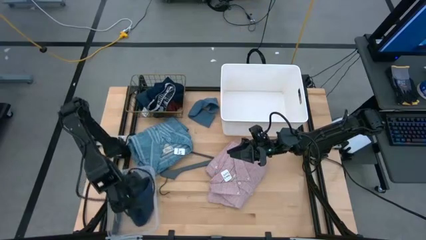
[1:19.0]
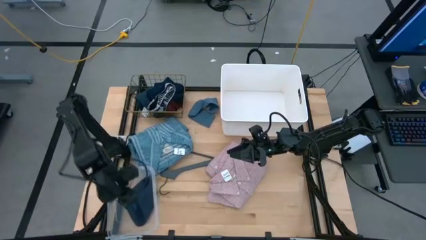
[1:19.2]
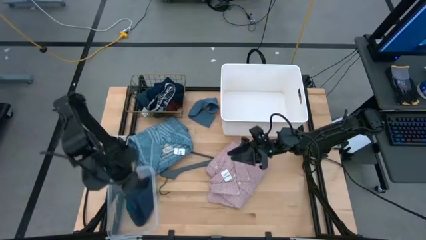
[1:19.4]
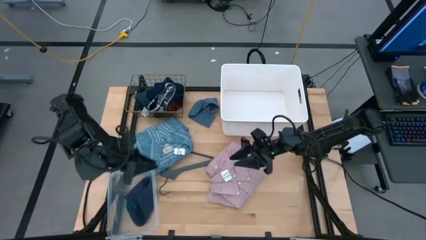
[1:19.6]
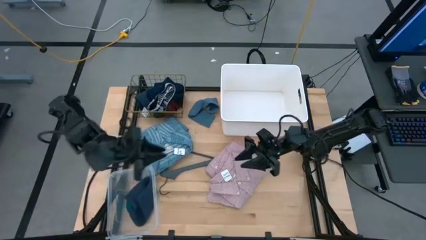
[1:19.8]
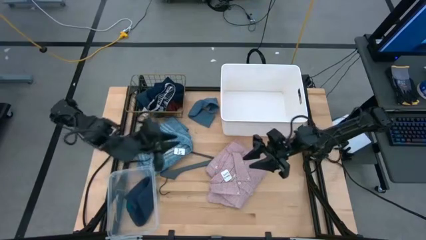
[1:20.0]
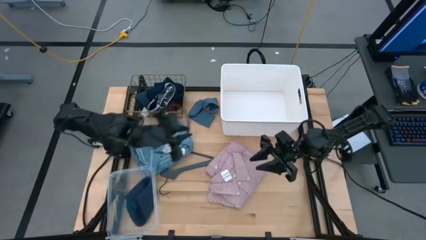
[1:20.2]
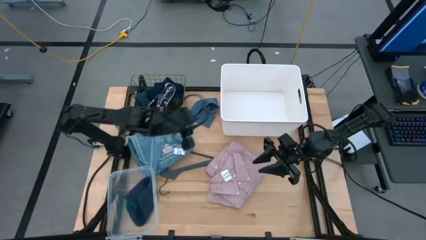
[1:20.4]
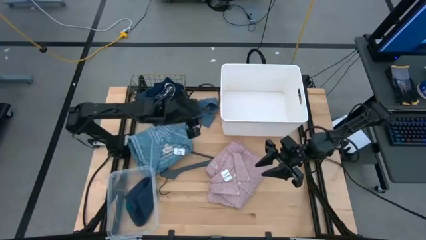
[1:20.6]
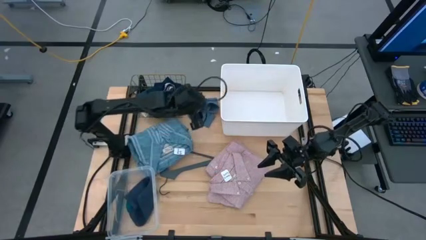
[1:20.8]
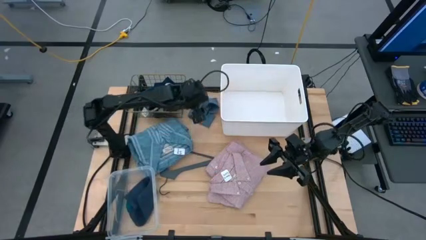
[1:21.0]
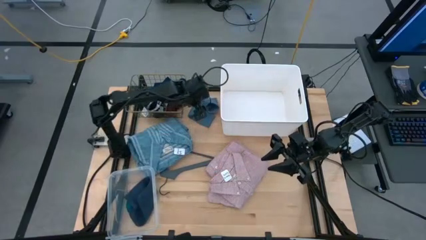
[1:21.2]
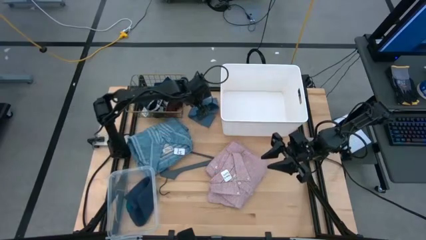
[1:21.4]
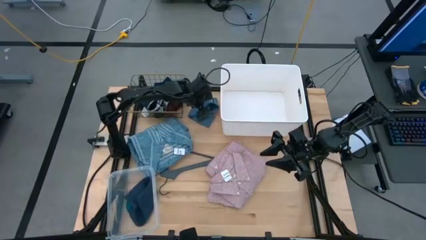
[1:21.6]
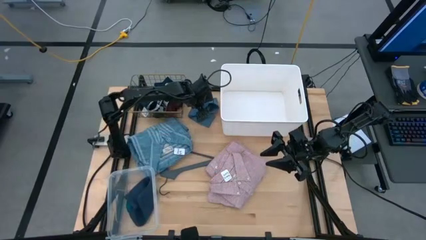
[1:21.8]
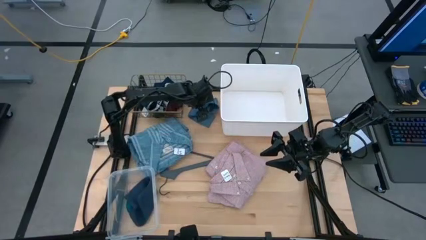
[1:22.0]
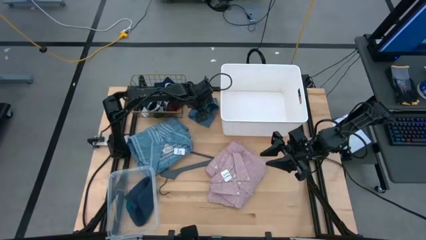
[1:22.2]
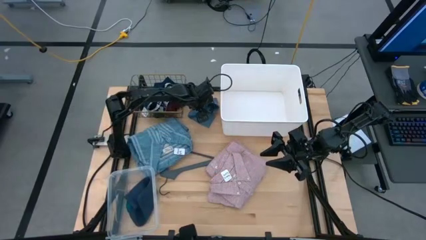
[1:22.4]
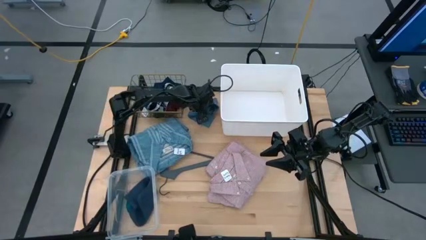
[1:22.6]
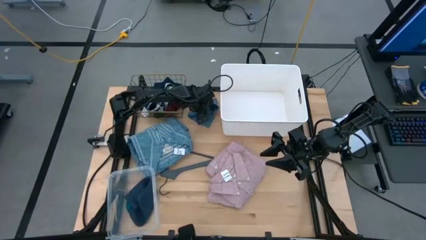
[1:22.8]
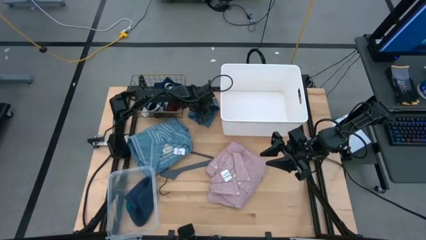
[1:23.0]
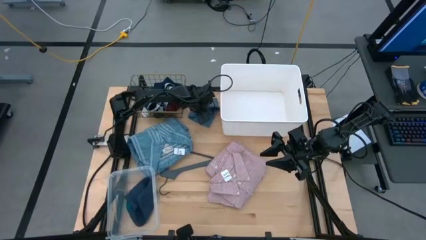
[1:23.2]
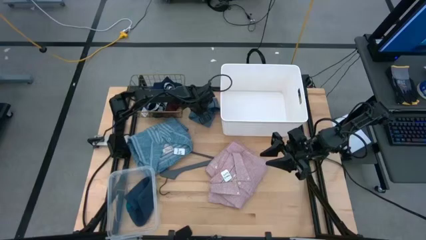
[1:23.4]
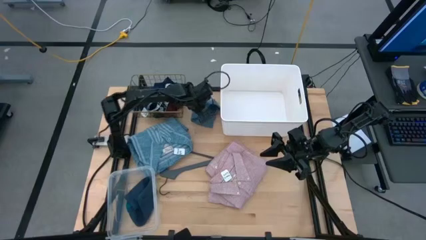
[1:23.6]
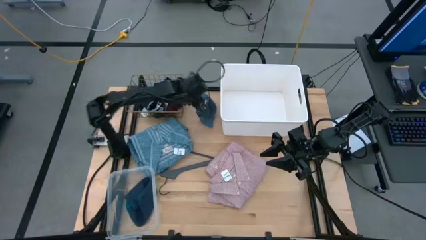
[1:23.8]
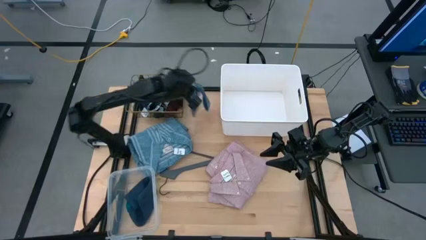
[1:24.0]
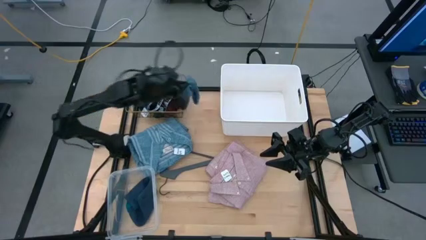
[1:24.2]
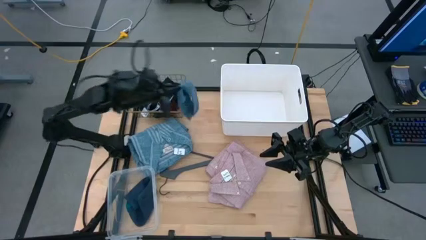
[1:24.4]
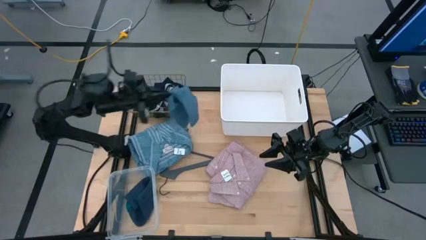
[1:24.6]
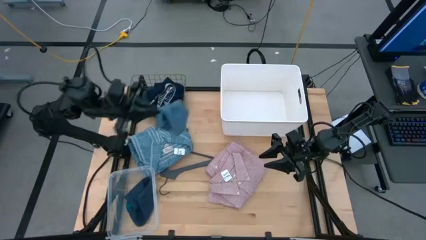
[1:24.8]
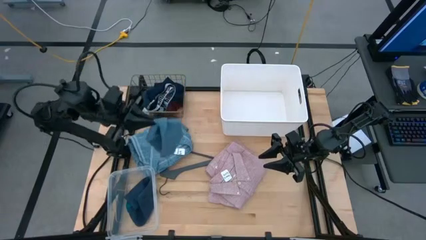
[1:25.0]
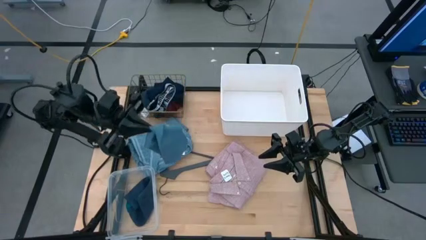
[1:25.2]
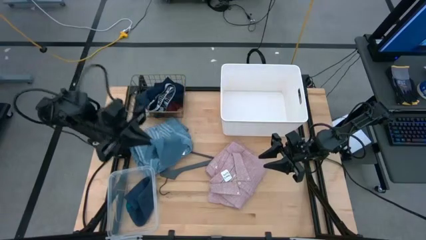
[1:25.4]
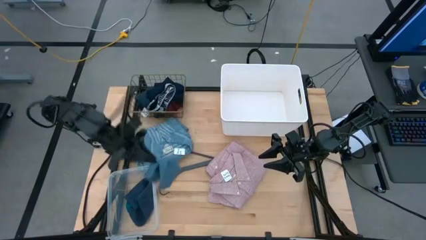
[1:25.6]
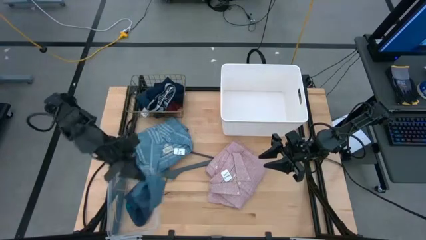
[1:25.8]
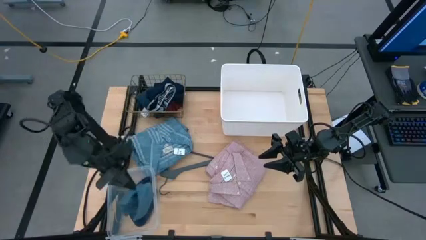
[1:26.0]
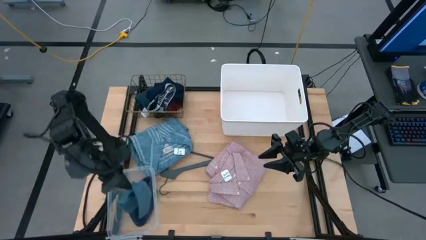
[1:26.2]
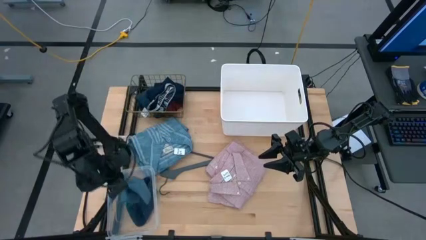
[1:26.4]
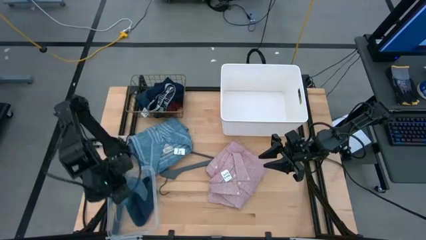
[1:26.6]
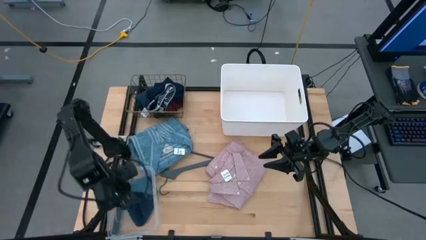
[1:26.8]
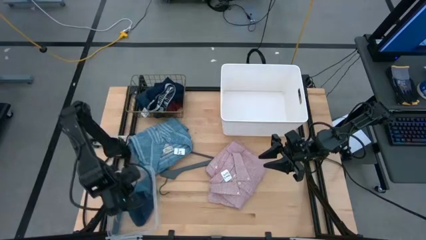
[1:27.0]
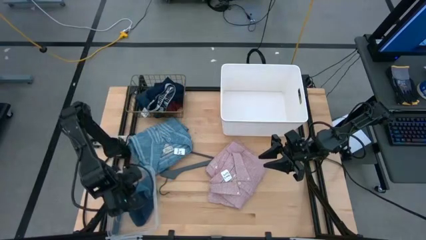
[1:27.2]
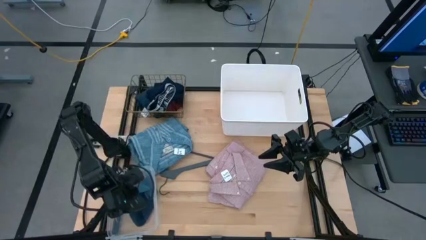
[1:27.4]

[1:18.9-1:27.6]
Task: Pick & Place Cloths
Put the light blue sock into the transparent bin

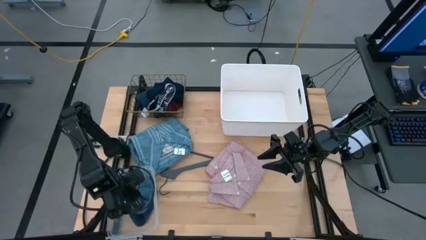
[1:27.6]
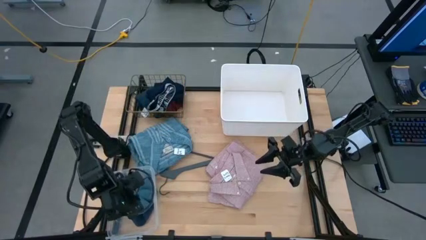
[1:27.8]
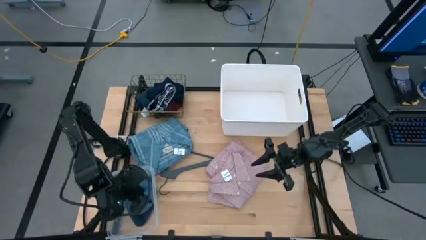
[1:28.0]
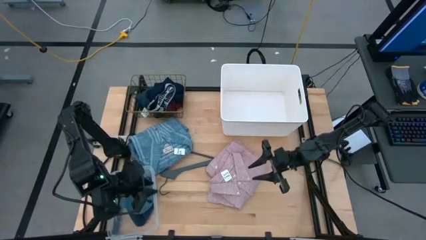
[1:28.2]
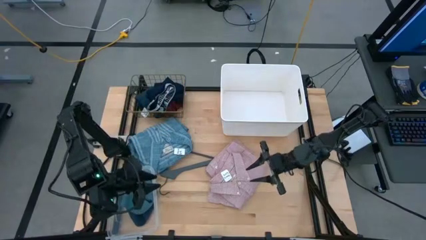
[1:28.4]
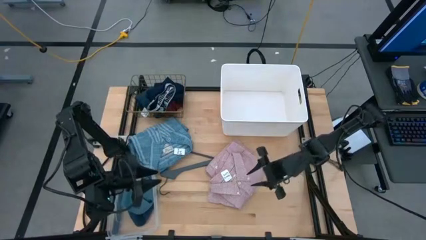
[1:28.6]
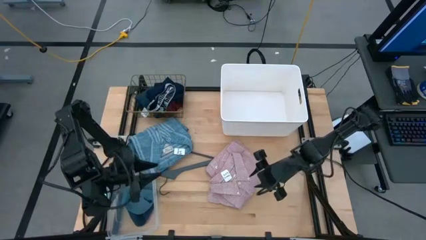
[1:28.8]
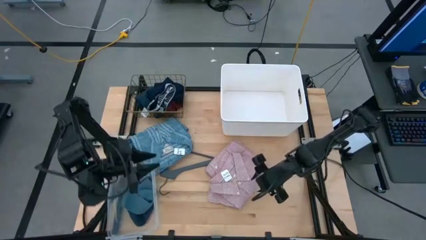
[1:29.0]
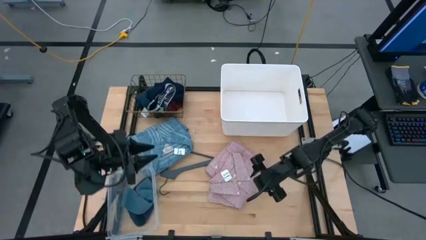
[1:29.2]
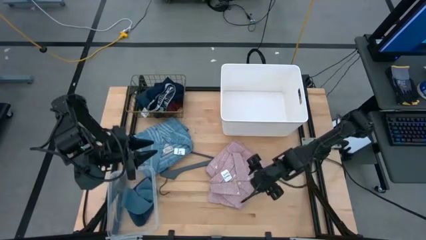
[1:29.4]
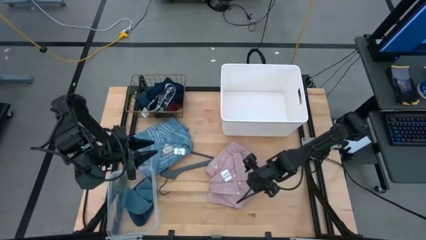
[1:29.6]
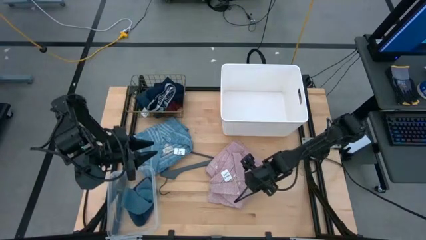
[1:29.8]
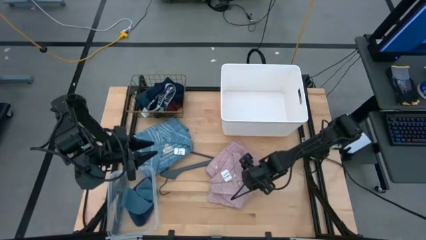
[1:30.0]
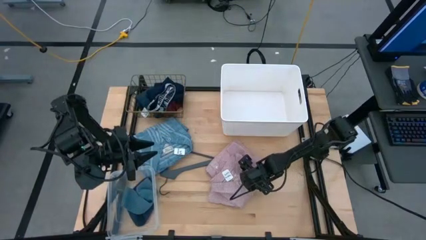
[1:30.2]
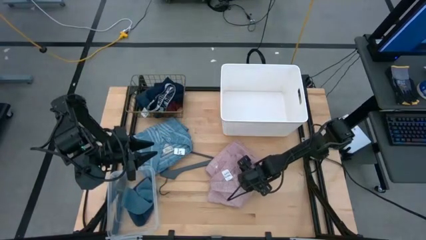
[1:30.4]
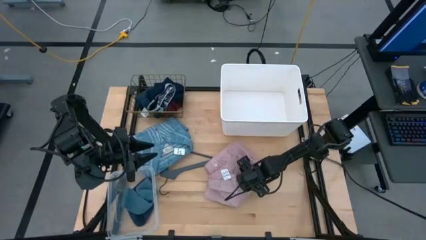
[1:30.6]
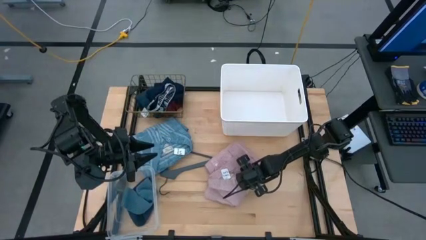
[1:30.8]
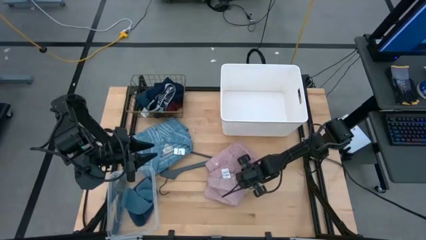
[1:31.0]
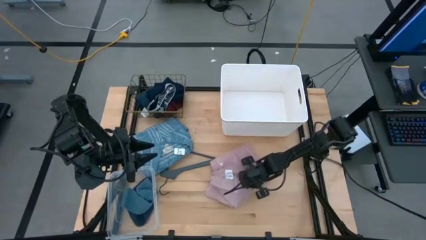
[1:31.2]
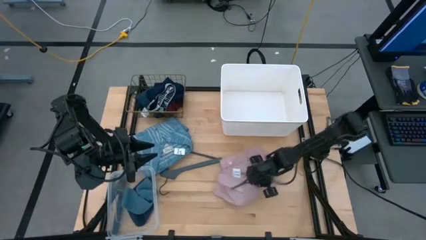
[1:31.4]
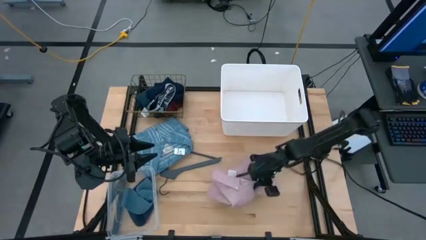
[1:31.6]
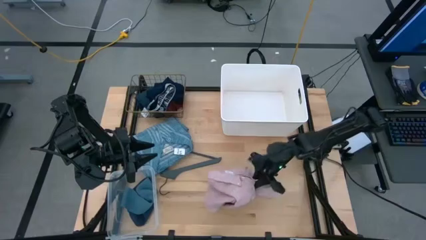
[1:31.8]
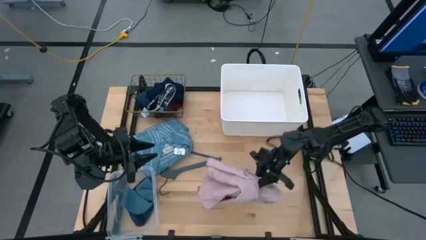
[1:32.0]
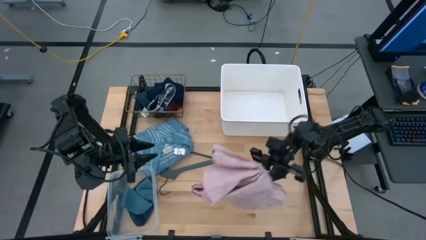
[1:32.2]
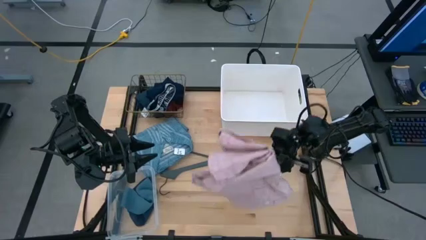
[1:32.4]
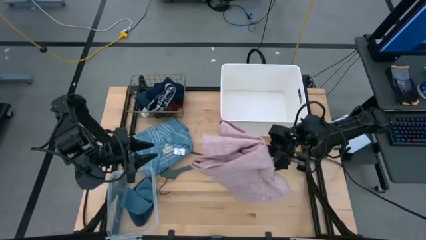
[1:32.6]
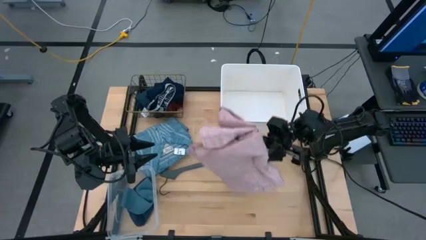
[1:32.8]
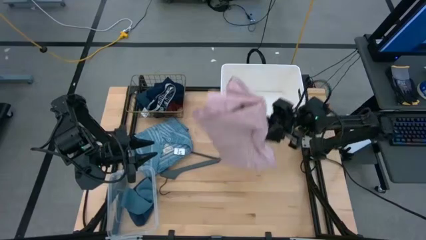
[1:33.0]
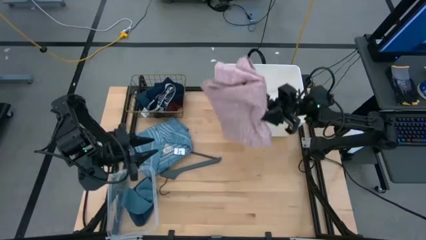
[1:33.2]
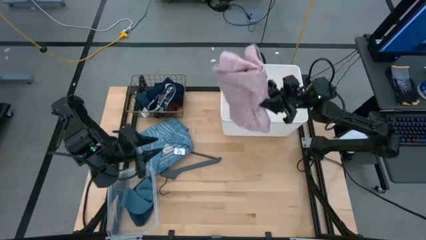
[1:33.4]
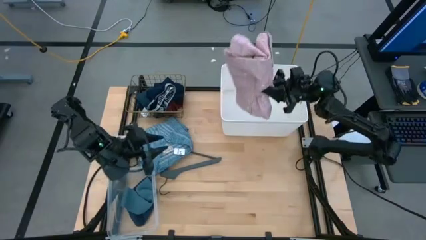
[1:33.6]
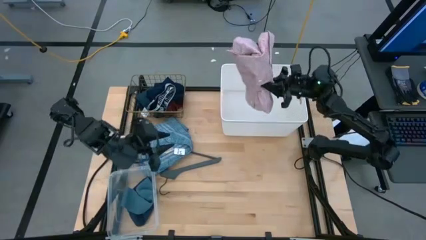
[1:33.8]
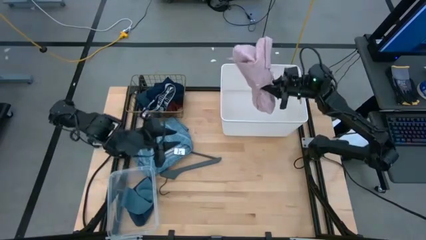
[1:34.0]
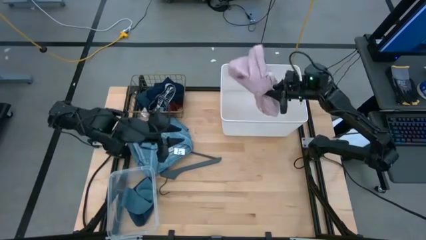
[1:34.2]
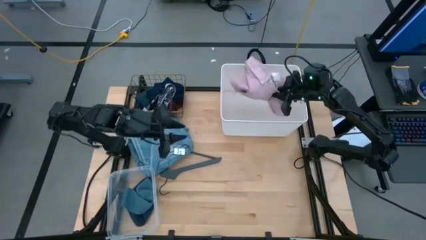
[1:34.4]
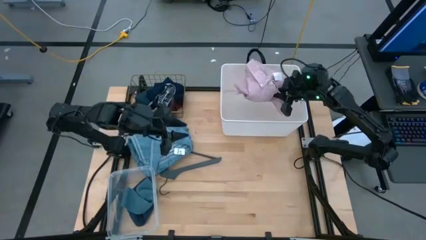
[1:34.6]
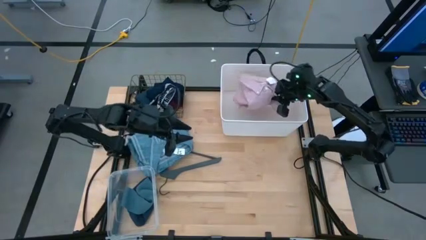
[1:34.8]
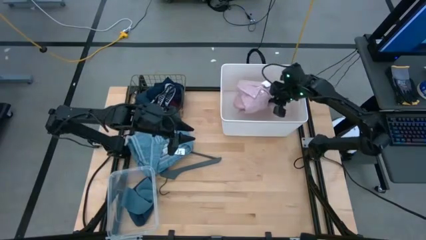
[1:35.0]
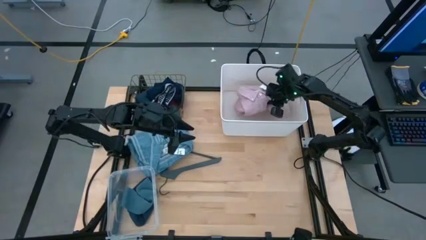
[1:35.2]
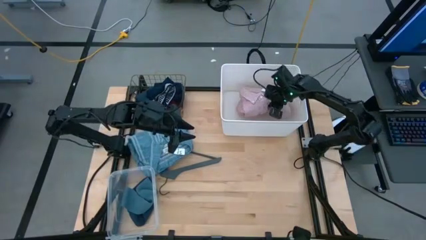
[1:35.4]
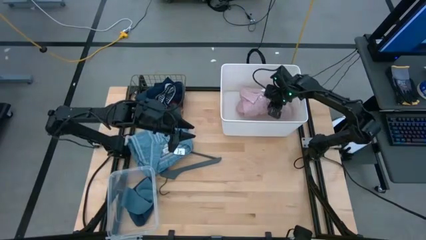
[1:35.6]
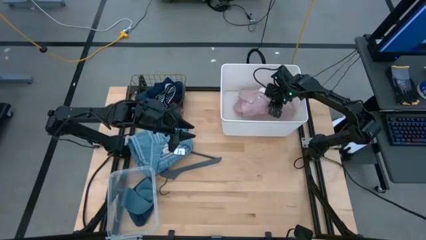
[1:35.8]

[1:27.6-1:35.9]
Put the pink shirt into the white bin
